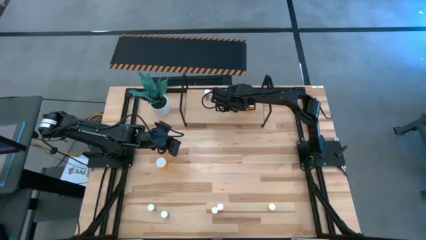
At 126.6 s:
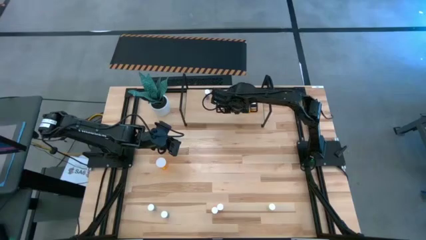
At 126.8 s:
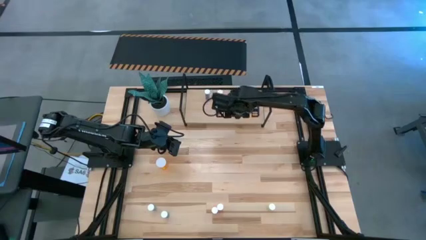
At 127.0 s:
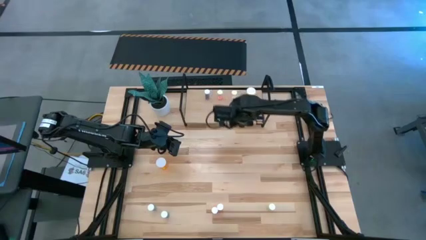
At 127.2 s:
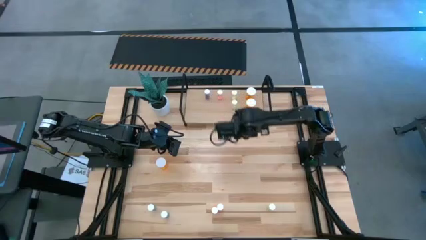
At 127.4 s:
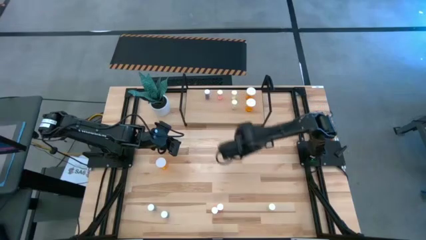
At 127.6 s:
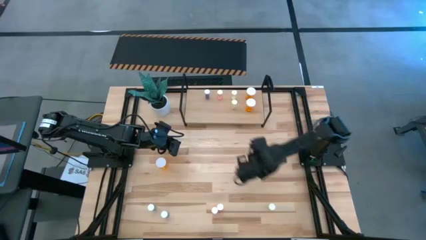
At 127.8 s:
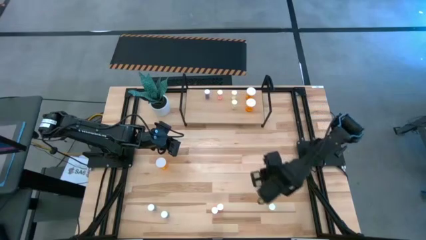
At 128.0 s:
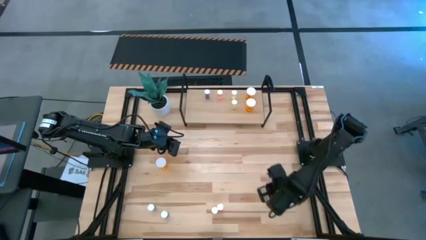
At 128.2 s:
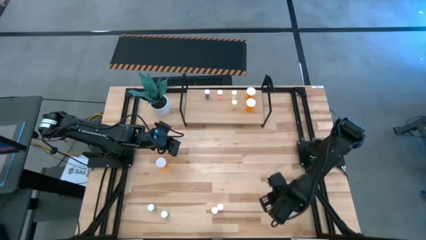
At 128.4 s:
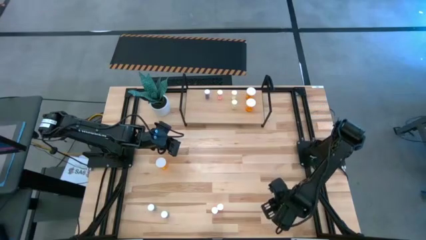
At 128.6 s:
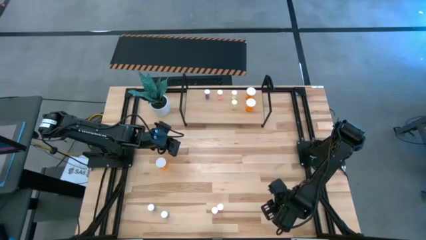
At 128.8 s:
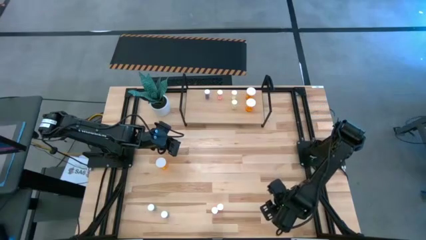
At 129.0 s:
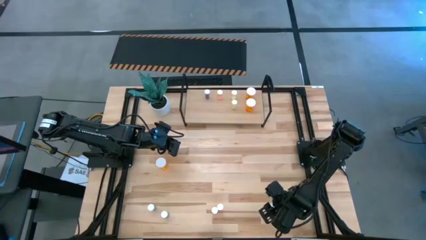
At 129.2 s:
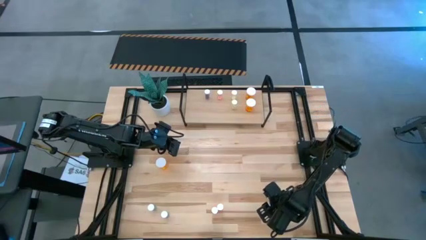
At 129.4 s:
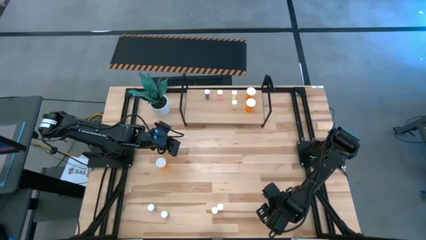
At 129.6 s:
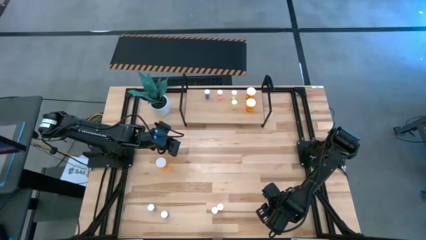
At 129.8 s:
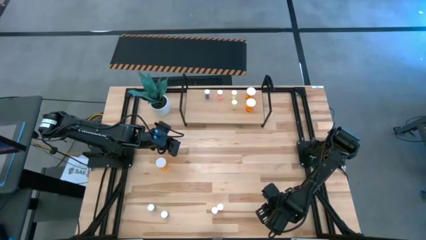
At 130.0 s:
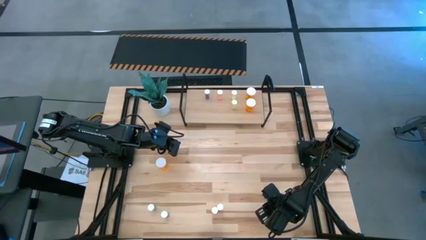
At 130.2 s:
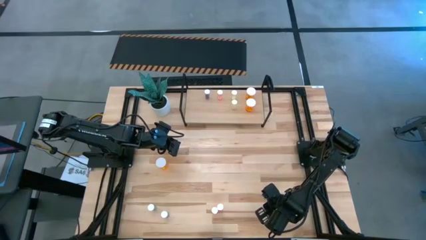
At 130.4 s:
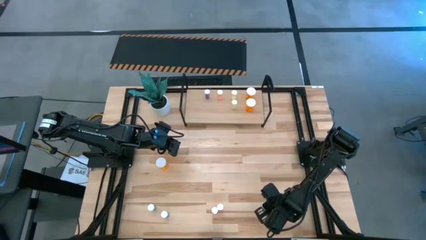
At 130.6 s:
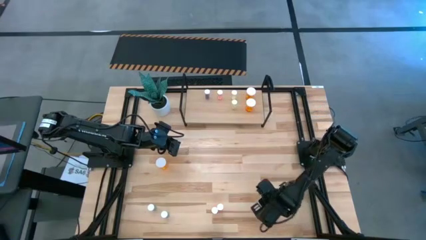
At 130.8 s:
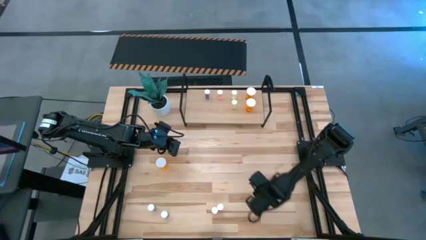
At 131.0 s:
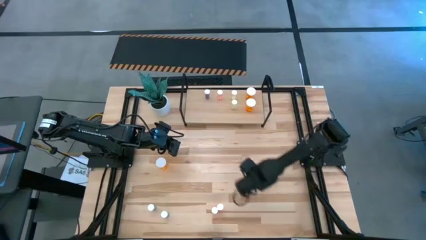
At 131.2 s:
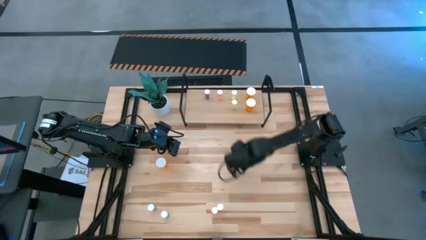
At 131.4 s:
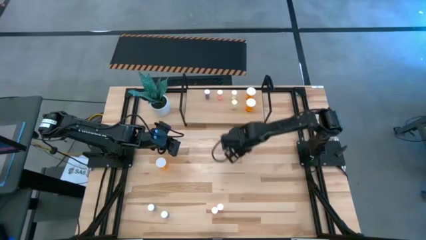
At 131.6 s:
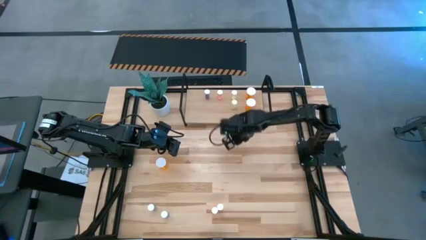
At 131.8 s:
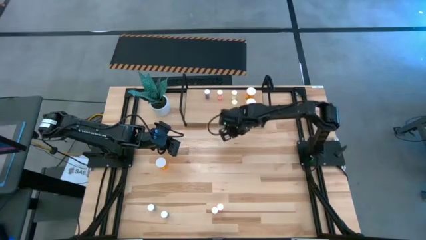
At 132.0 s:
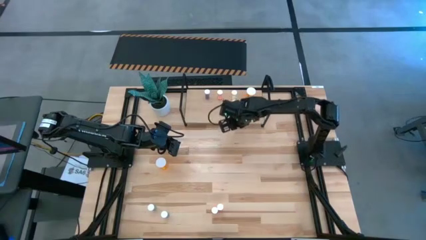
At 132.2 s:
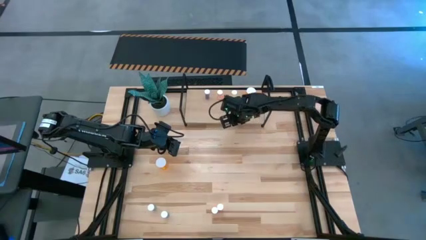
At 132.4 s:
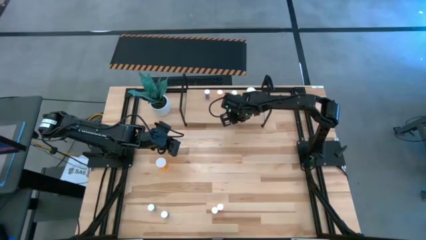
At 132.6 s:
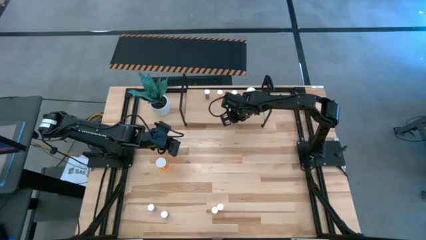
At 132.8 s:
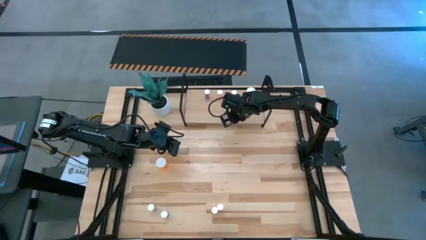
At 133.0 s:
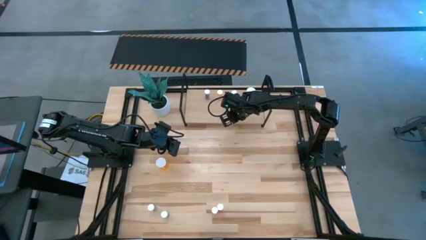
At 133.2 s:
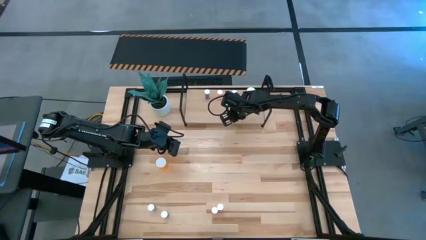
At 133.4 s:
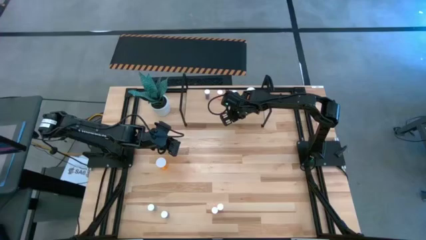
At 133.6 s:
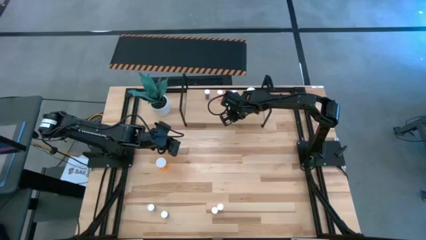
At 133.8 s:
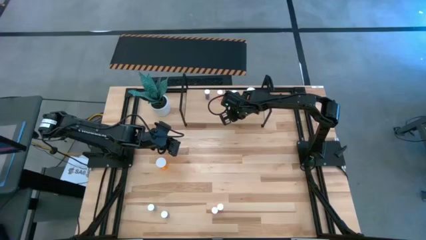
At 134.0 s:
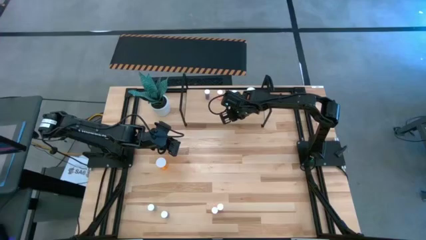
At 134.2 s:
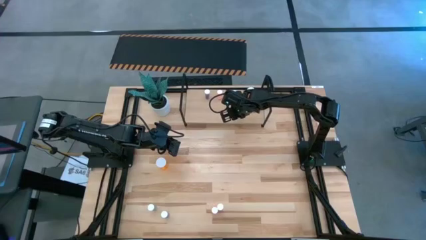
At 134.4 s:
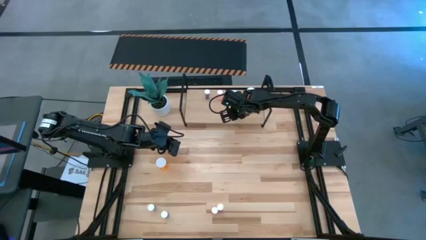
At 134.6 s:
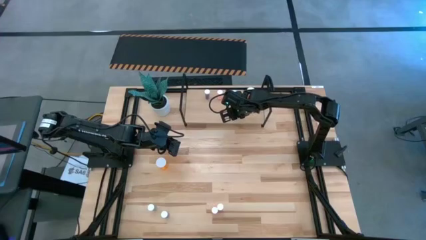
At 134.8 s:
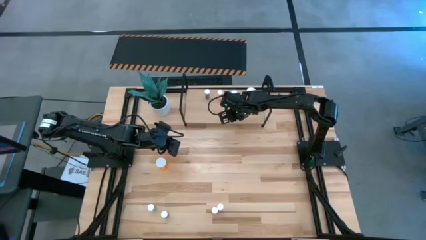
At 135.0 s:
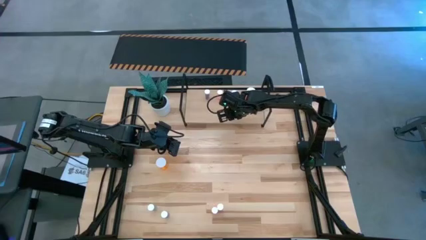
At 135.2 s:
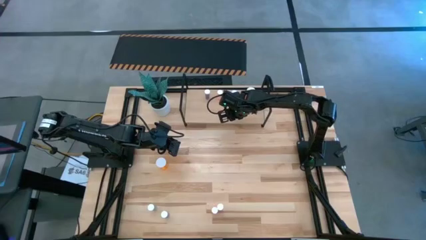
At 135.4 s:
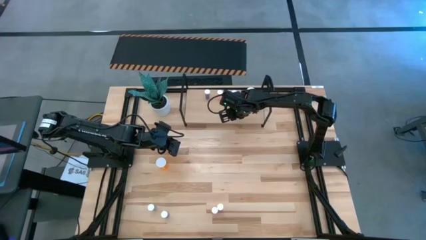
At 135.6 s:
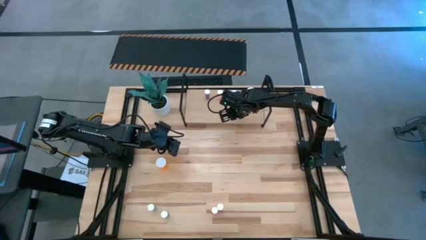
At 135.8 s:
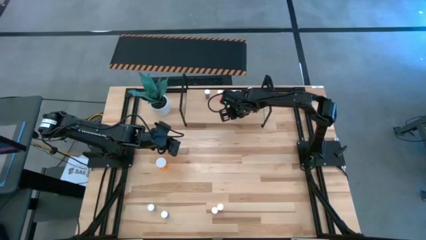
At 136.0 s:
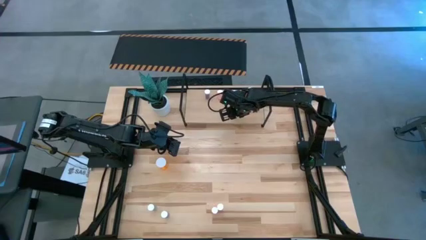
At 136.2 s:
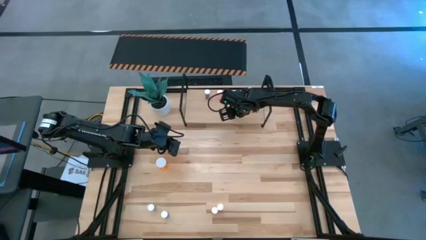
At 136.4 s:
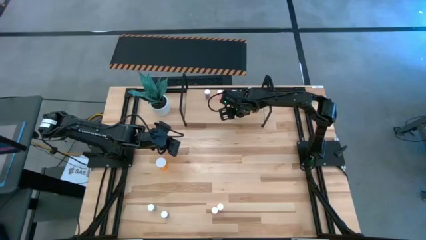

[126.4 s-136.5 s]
Task: Pick and place medicine bottles onto shelf by color
Put the yellow pill bottle on the shelf

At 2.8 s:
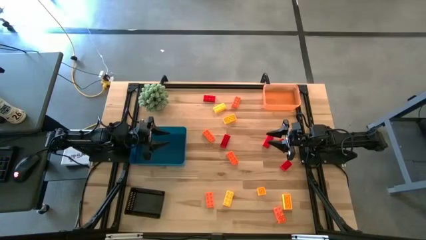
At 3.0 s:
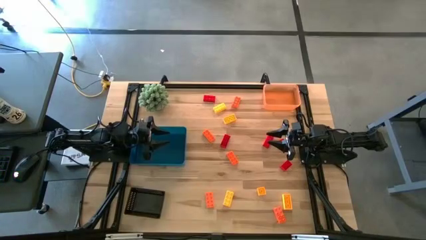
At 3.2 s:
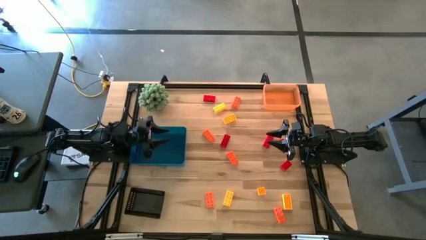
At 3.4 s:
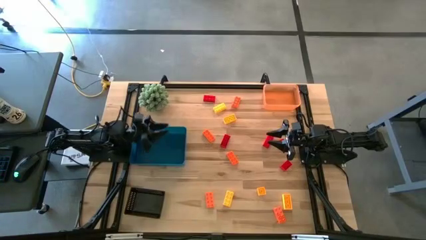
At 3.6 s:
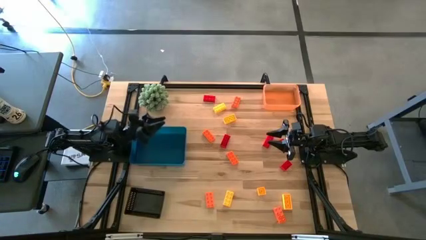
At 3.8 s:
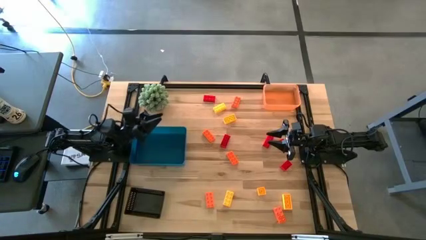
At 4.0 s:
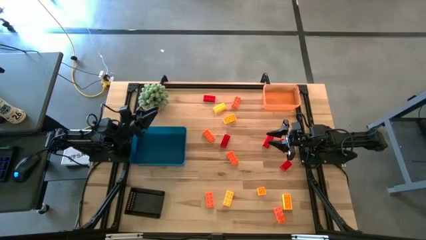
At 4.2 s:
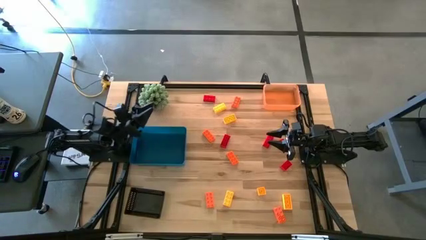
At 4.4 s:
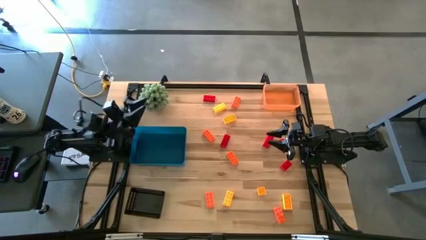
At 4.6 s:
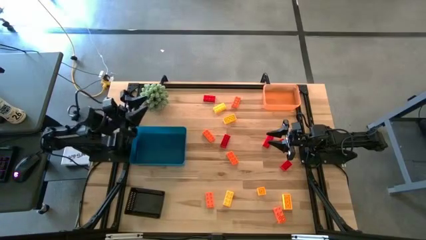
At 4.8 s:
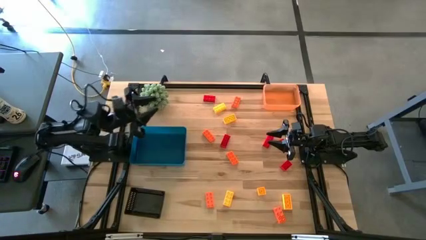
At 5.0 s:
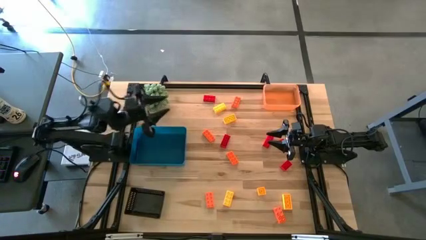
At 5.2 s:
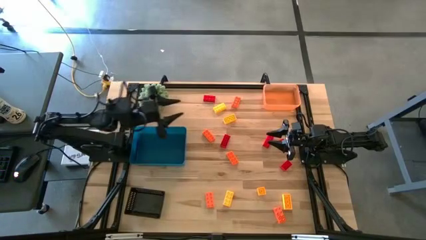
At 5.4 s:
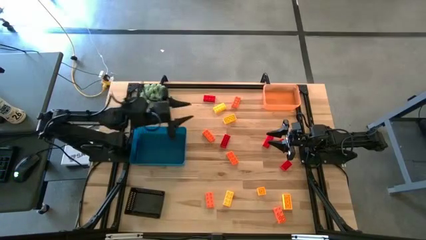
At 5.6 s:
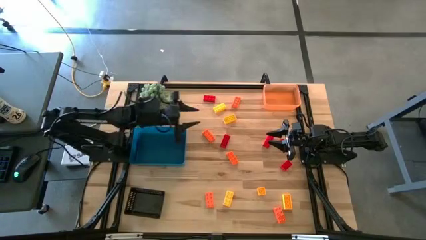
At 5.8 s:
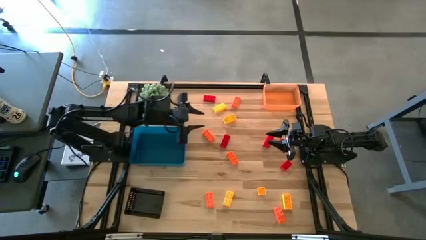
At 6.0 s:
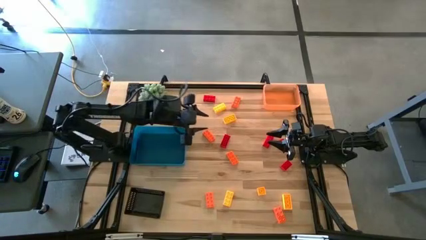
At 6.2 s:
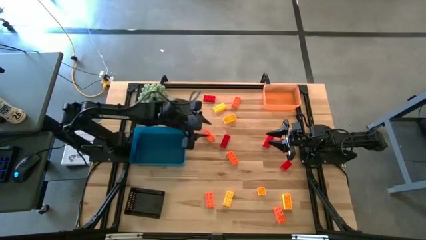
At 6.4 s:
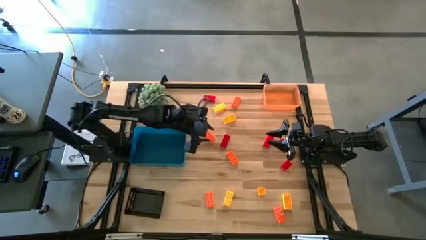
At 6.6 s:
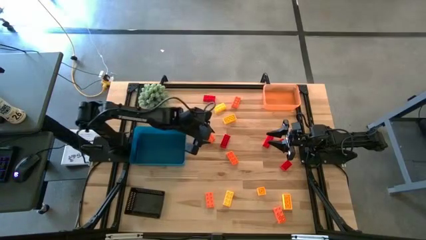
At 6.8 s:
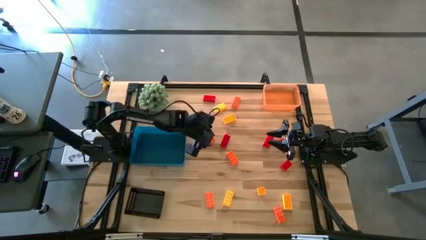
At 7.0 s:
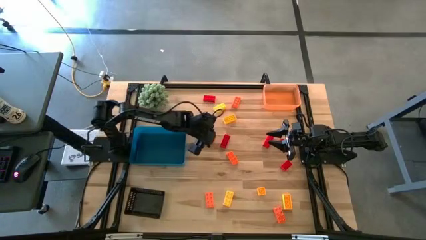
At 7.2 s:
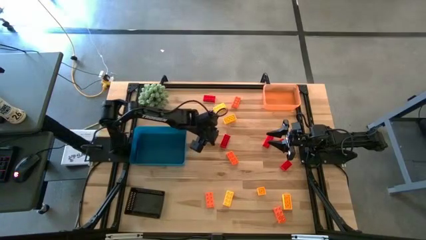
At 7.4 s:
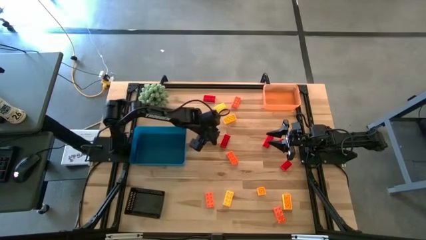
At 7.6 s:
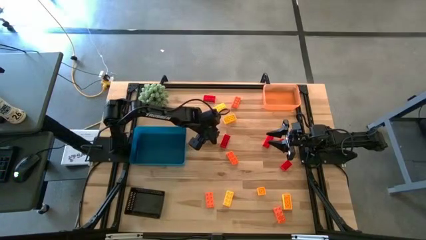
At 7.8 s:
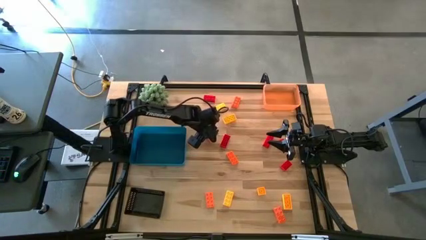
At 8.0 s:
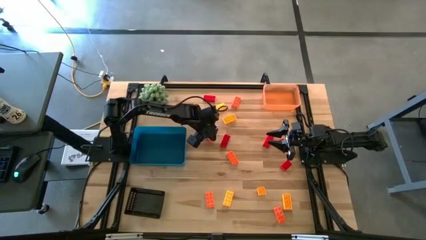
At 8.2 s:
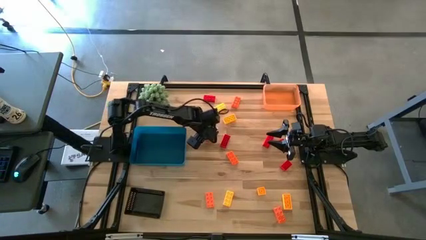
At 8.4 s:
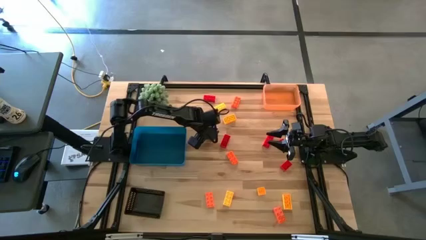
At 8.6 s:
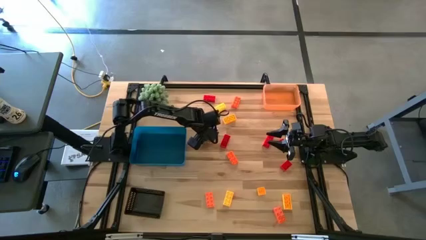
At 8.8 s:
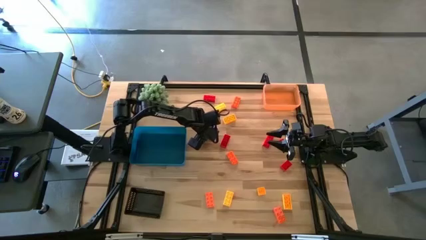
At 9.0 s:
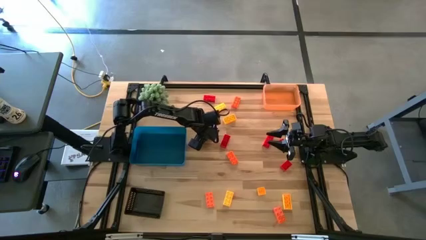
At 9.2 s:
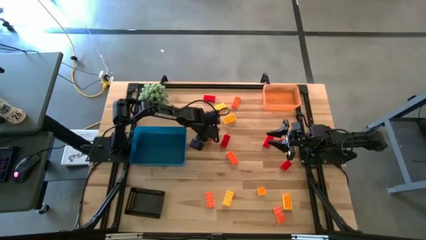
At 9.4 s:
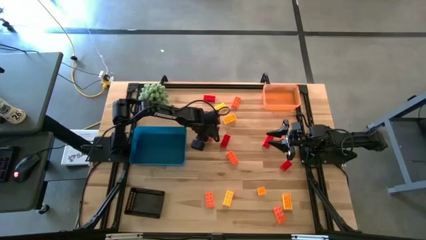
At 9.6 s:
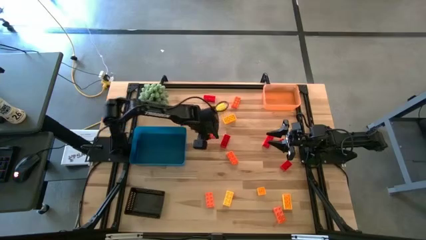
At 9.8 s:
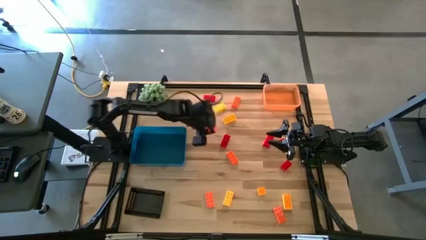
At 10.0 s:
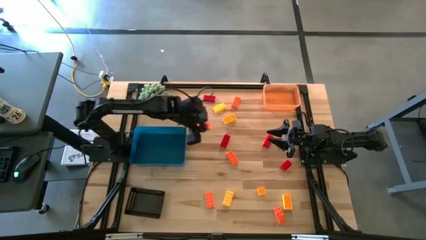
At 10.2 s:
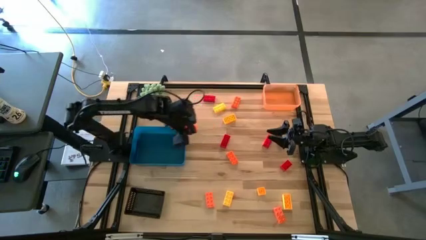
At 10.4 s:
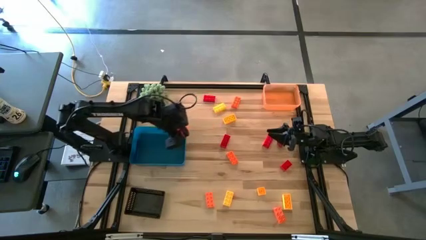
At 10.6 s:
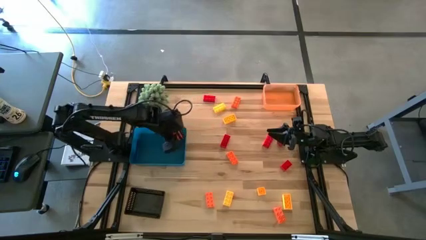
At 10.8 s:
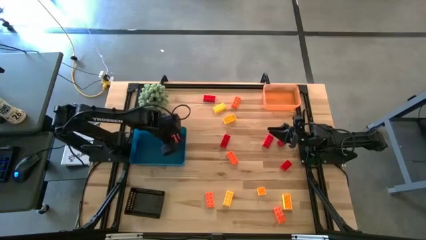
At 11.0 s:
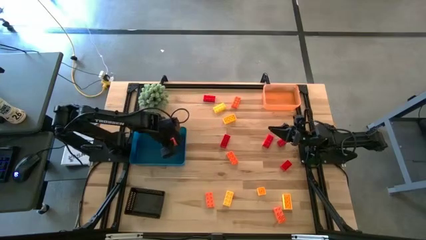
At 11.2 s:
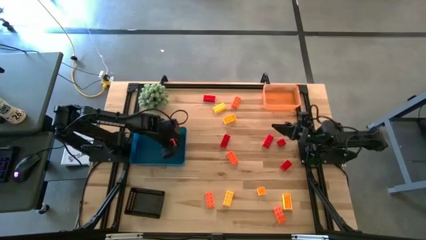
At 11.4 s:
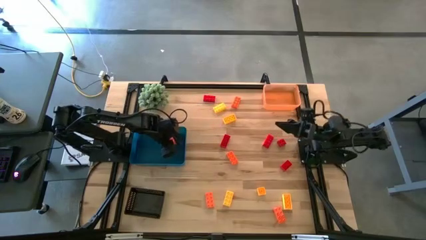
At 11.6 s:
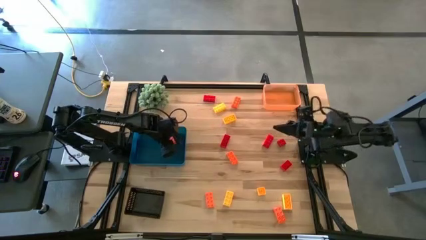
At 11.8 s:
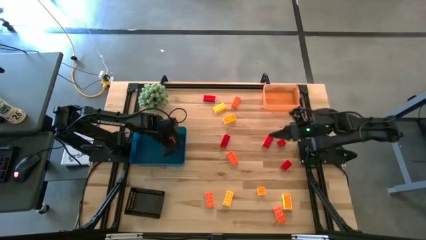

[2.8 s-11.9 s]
Task: Sort & place blocks by color
Put the orange game piece into the blue bin
